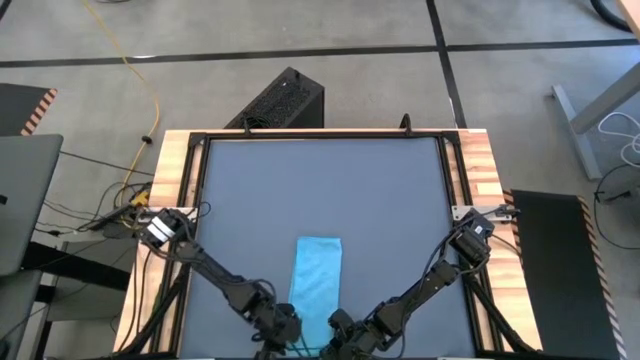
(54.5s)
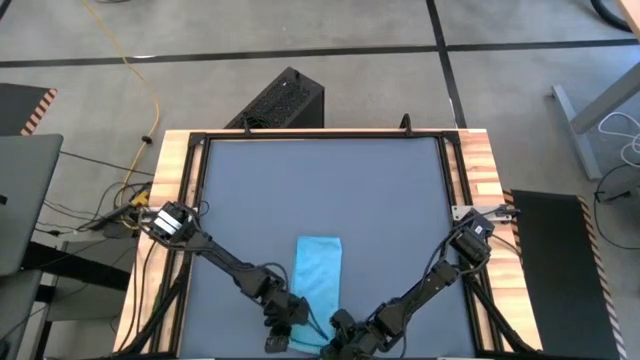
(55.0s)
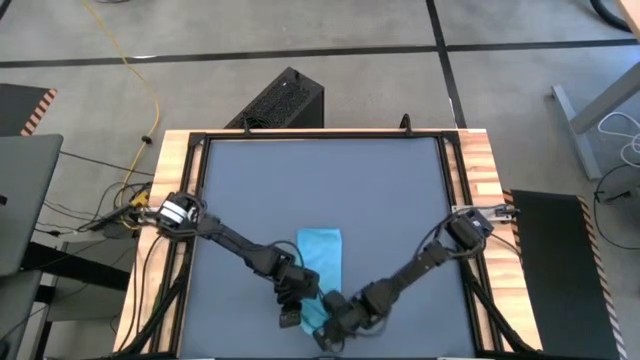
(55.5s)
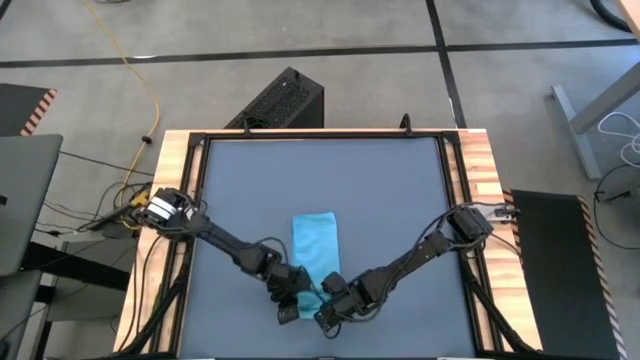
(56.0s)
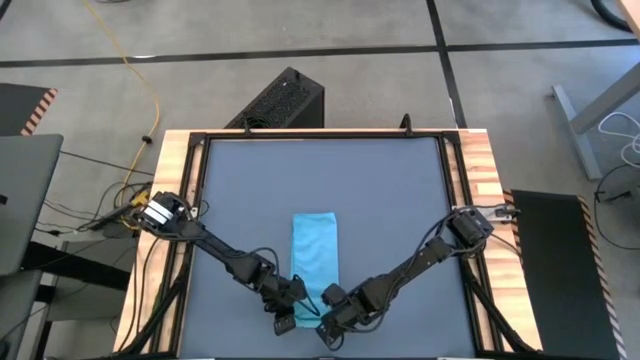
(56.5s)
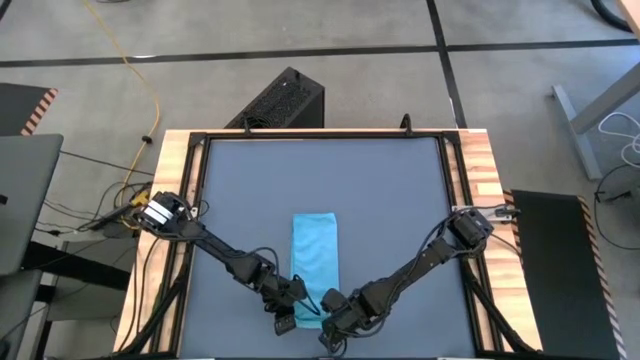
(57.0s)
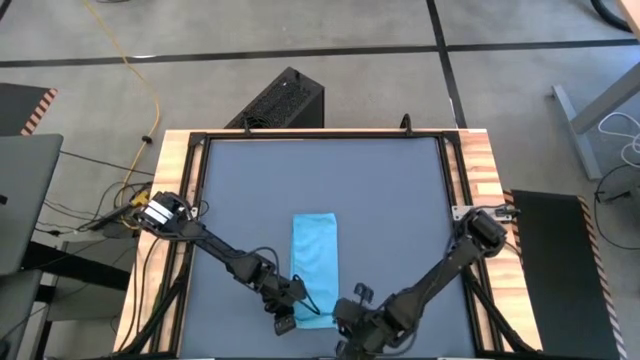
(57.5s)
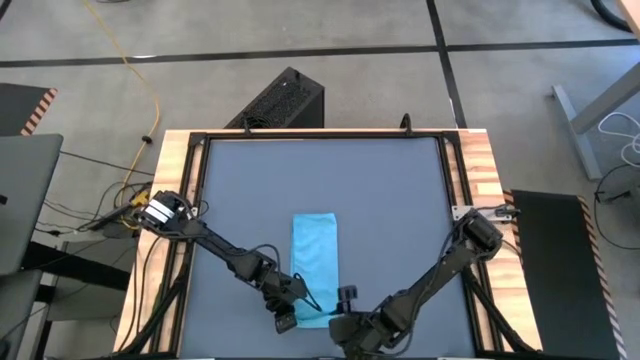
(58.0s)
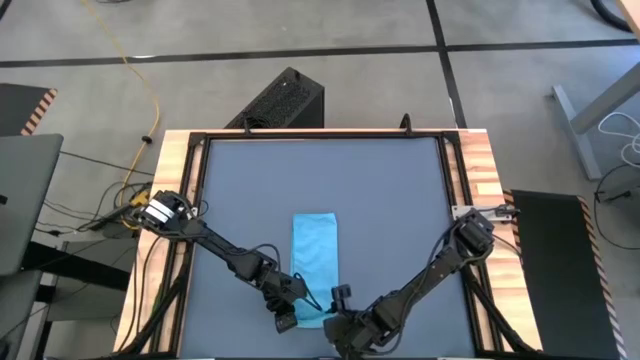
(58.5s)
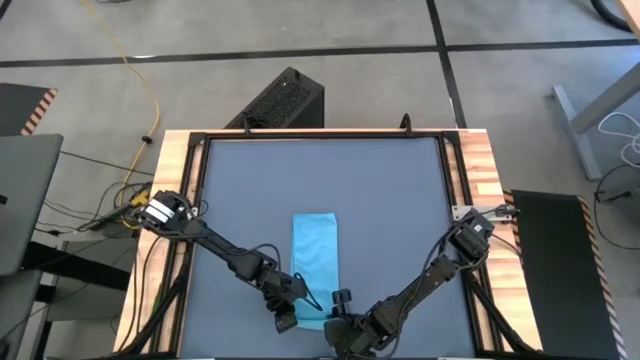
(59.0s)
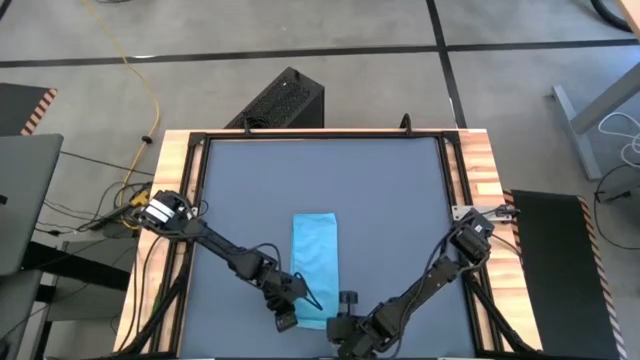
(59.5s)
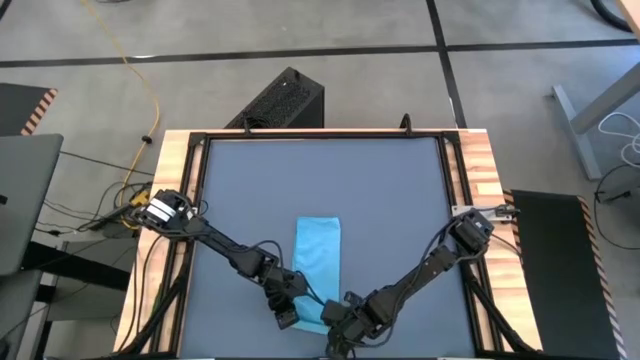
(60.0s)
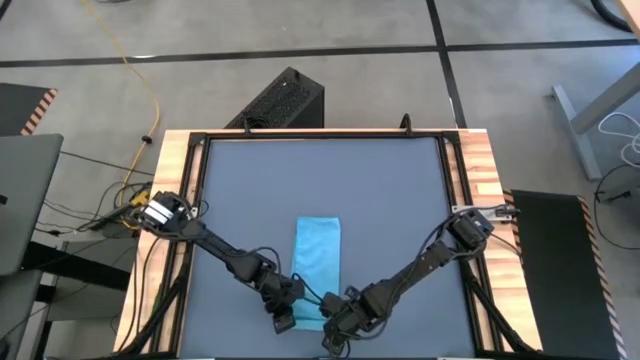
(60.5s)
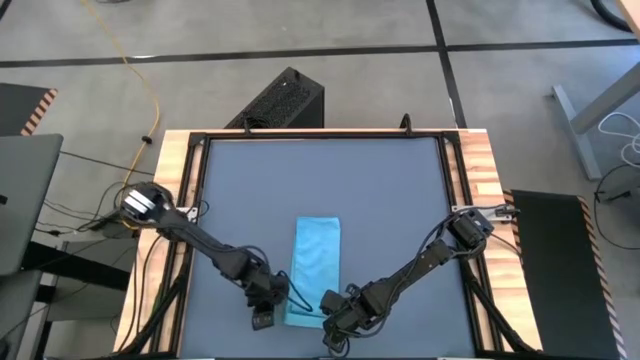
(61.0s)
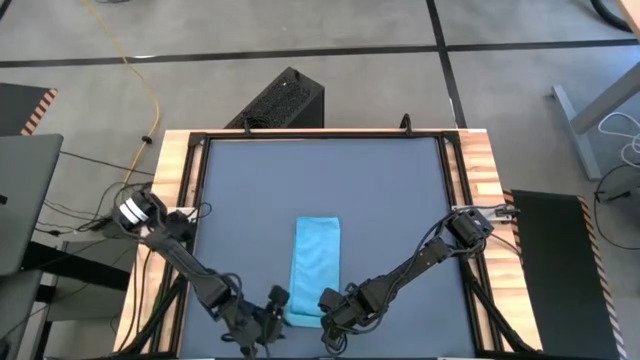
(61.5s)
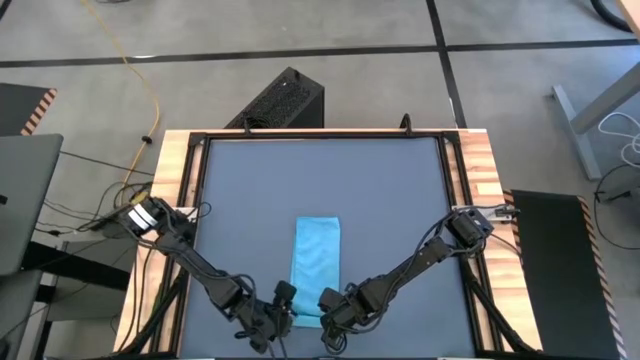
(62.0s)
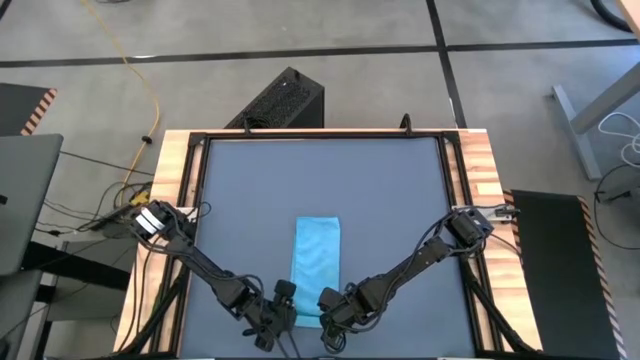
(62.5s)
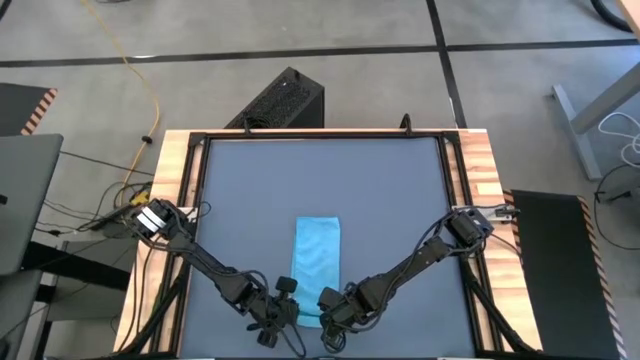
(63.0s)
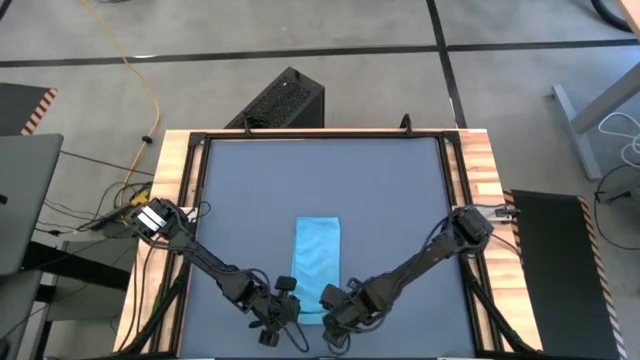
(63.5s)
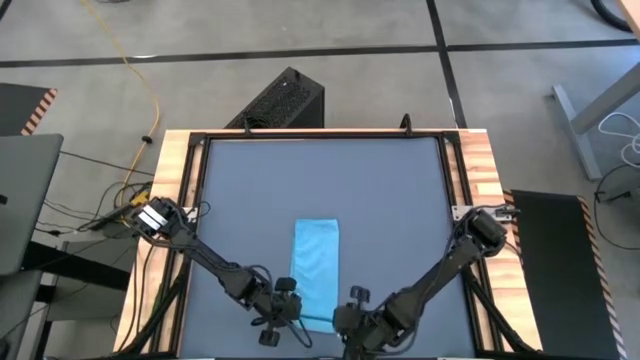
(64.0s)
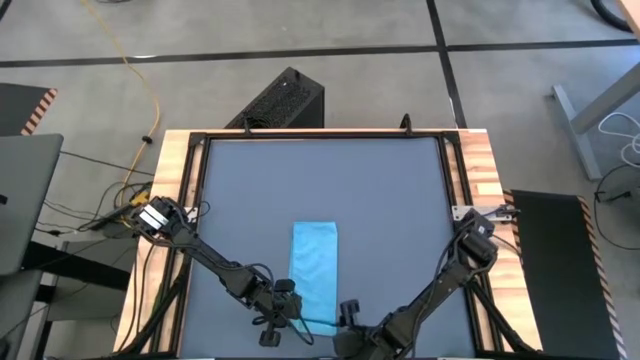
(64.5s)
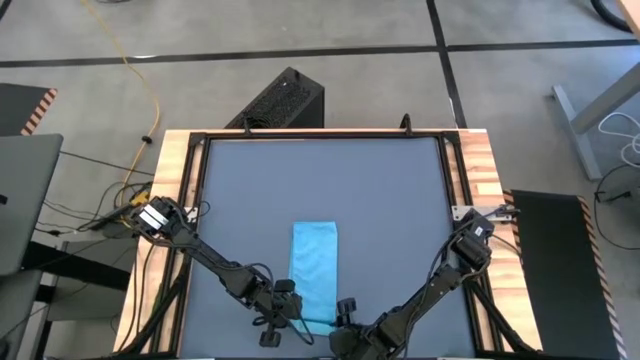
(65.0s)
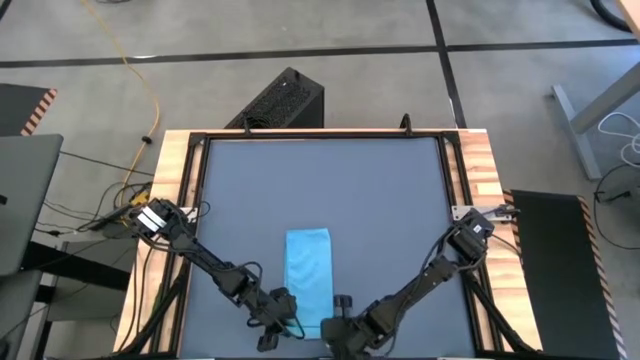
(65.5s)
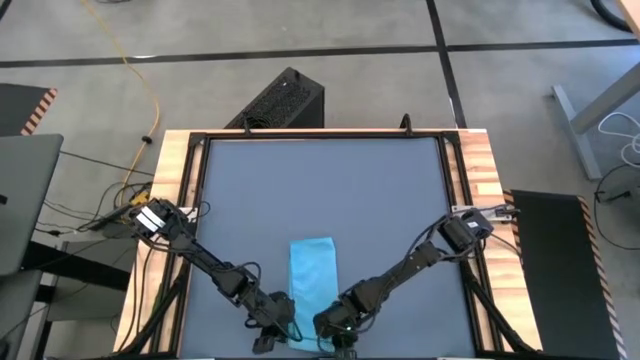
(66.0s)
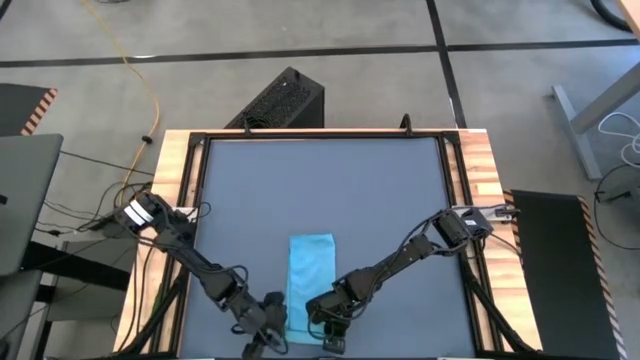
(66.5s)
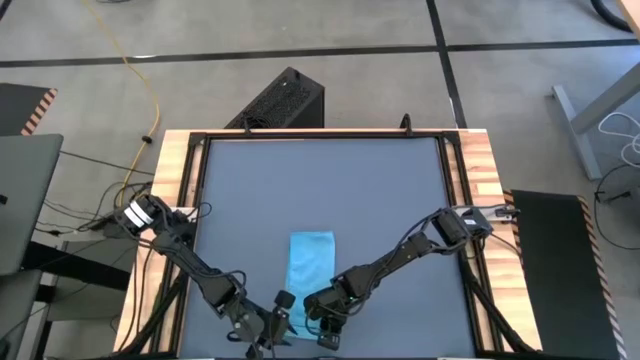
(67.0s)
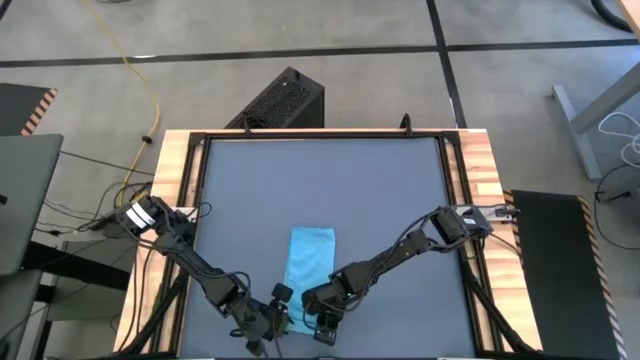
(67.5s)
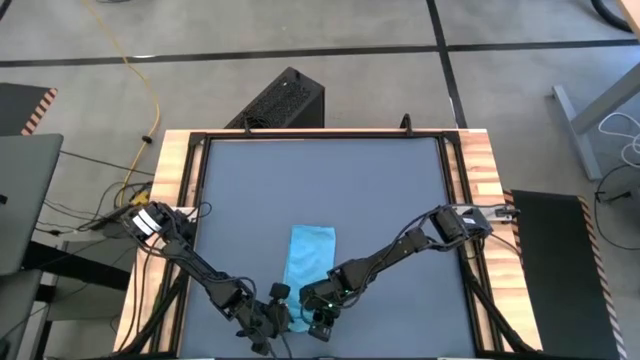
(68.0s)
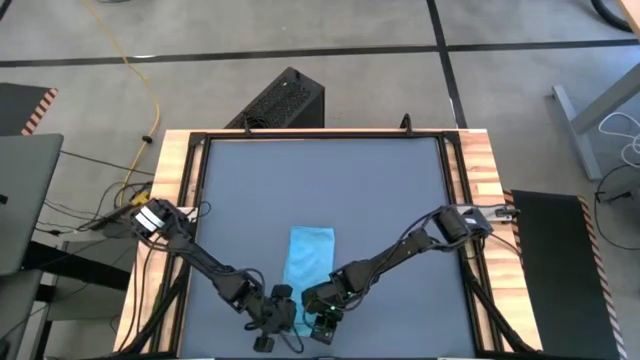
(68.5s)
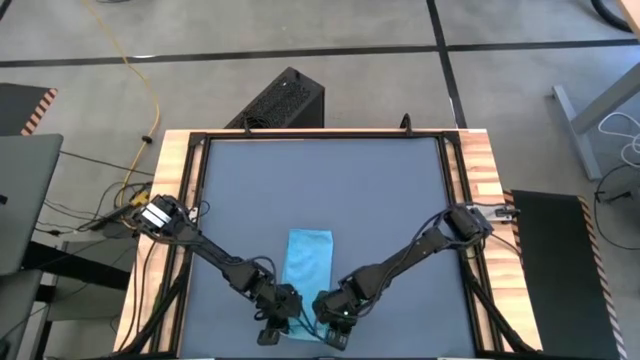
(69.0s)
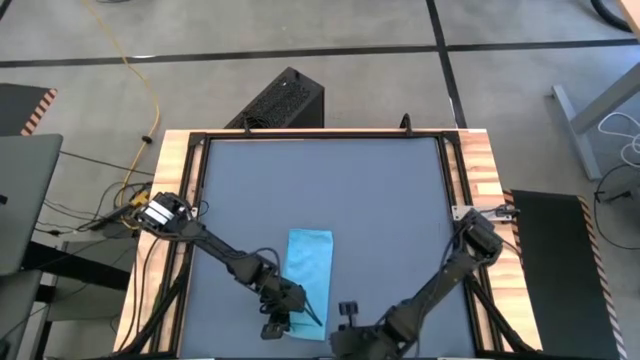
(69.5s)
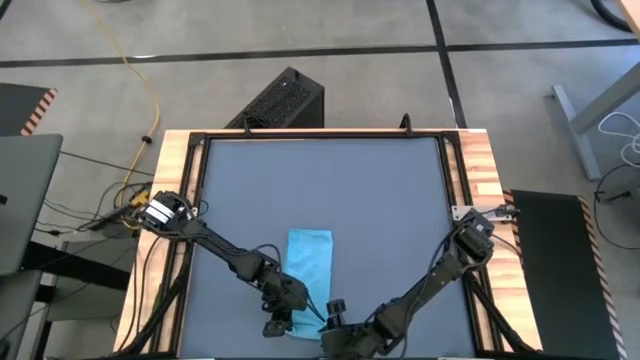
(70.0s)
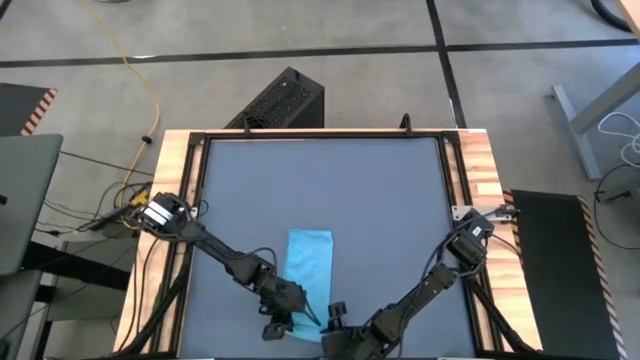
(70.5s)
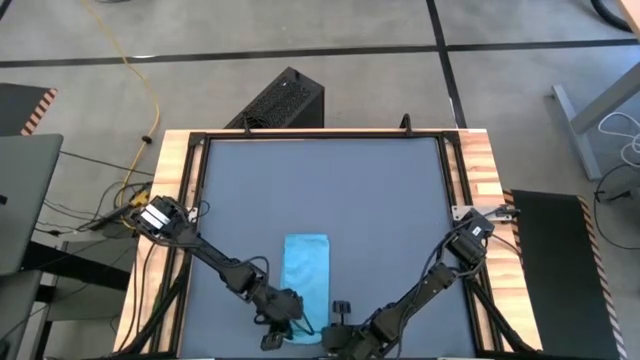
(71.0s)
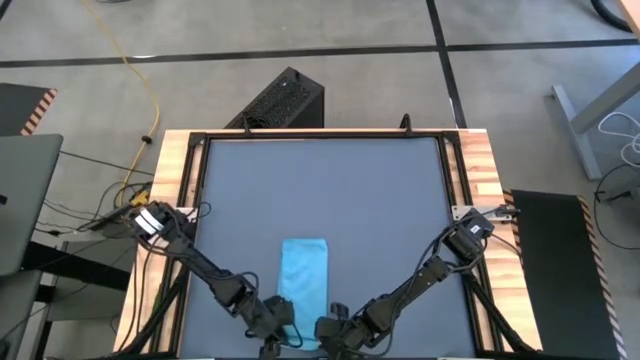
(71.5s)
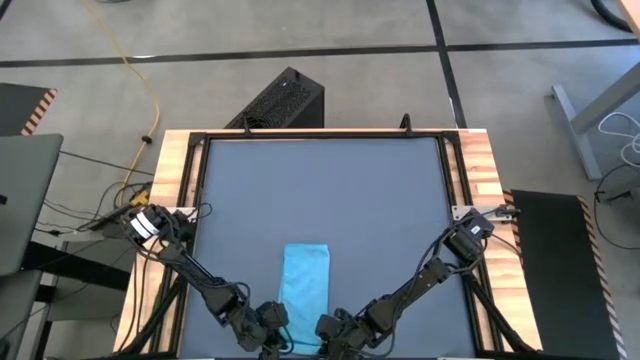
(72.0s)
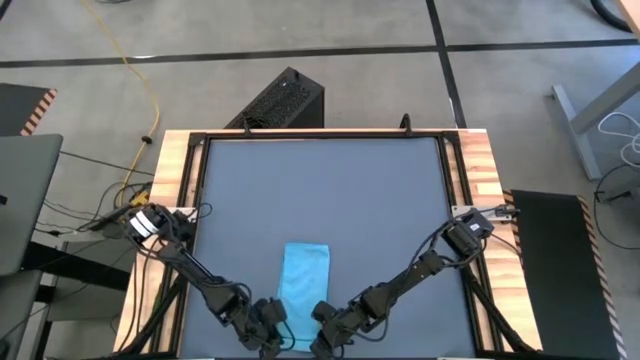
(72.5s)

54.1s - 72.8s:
Task: Roll towel
Roll the blue towel

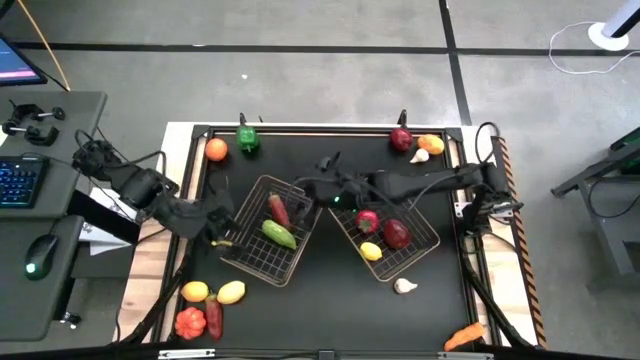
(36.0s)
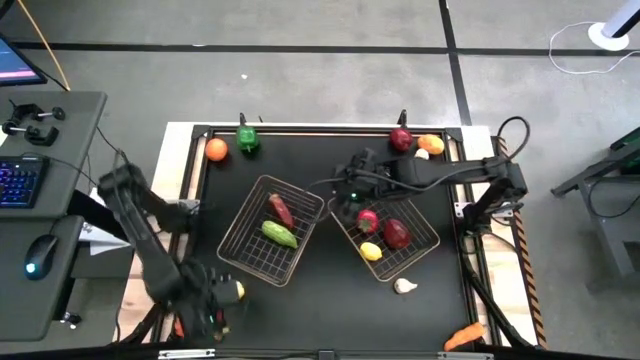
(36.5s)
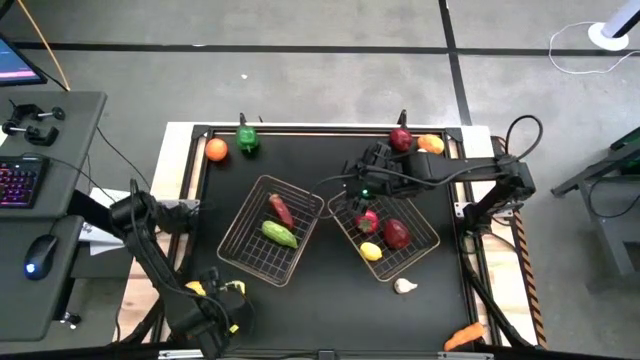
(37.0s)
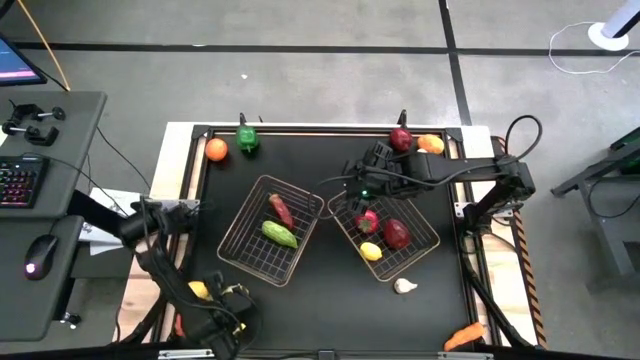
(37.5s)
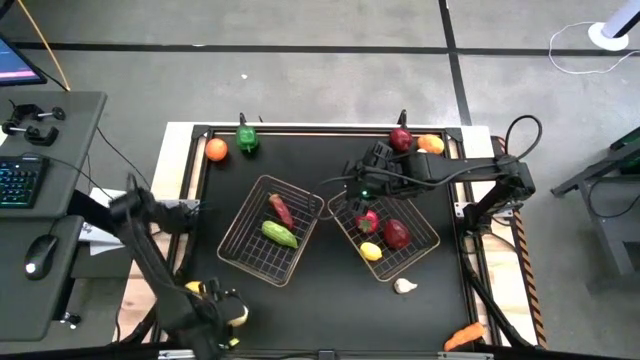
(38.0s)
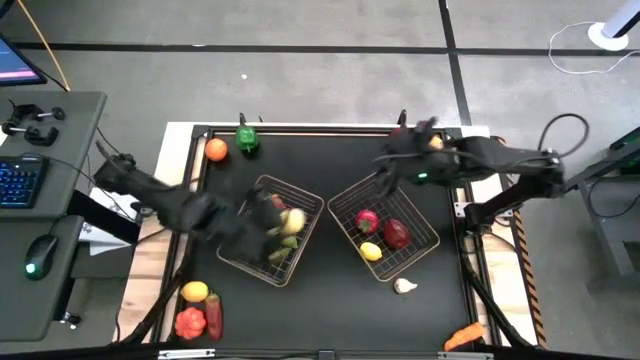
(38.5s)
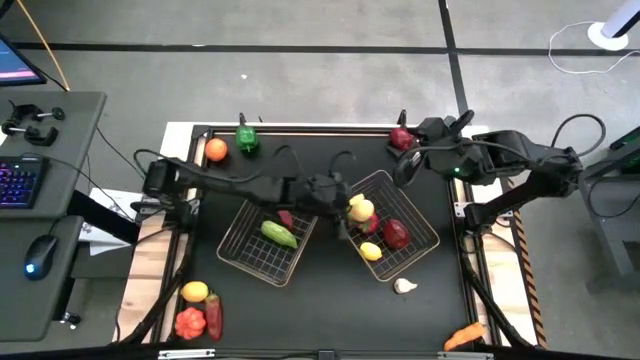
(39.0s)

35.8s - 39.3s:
Task: Sort produce into baskets
Put the right lemon into the right basket
